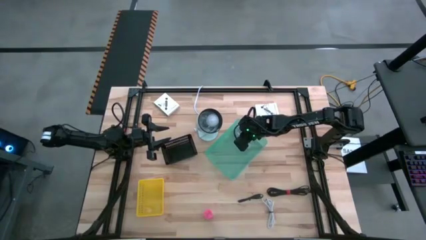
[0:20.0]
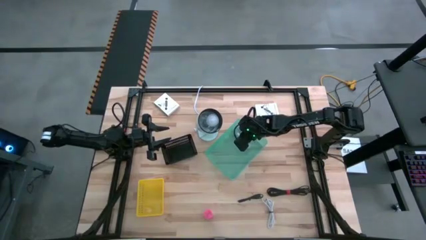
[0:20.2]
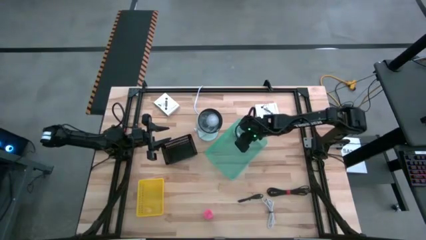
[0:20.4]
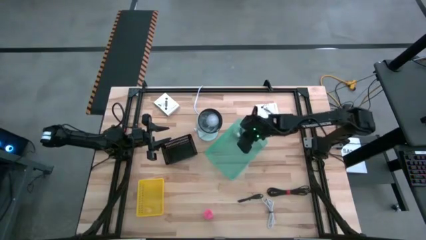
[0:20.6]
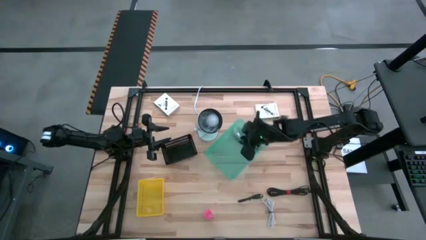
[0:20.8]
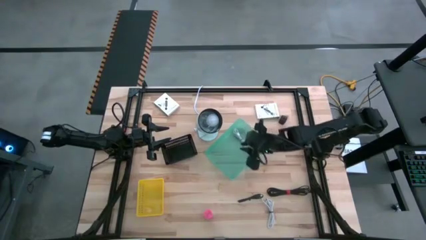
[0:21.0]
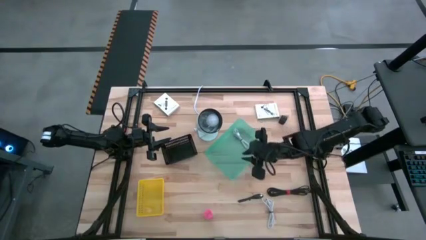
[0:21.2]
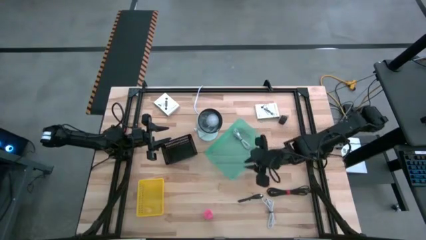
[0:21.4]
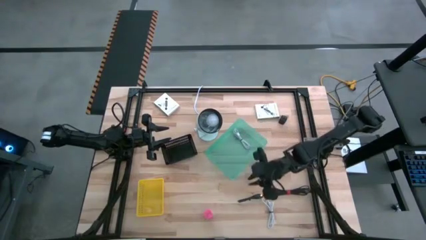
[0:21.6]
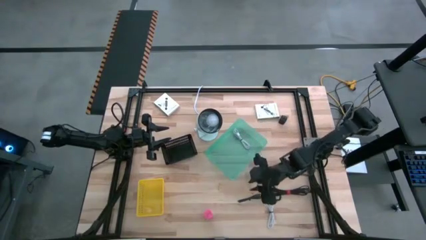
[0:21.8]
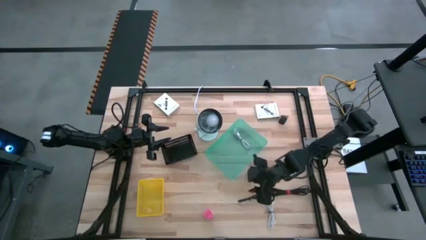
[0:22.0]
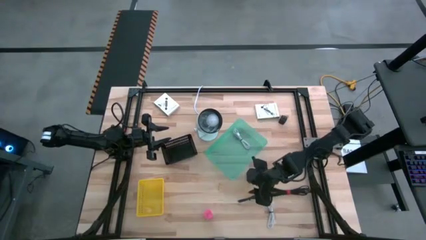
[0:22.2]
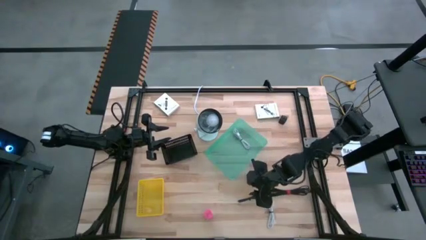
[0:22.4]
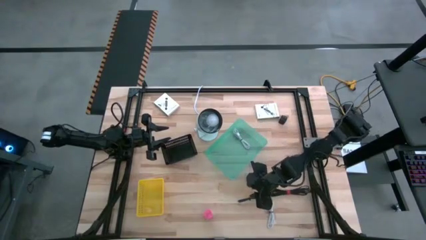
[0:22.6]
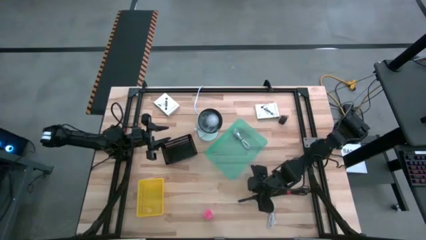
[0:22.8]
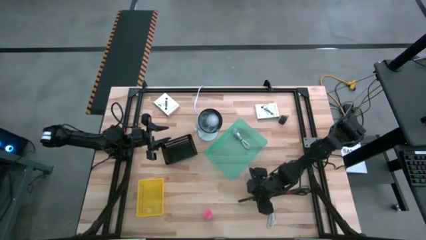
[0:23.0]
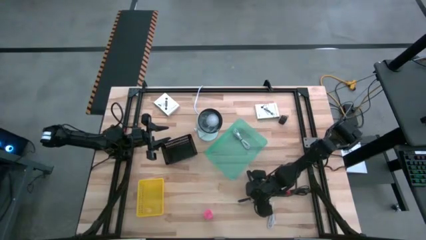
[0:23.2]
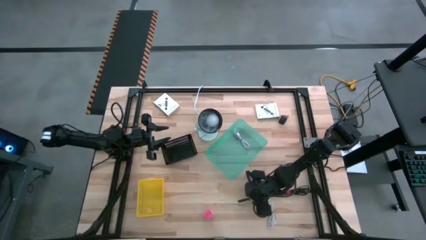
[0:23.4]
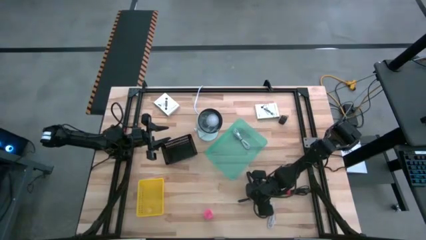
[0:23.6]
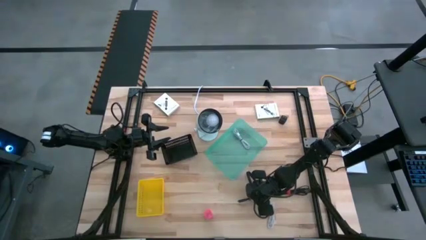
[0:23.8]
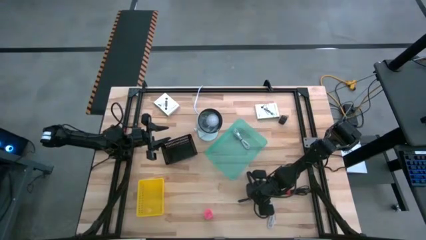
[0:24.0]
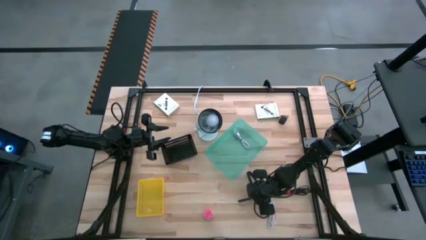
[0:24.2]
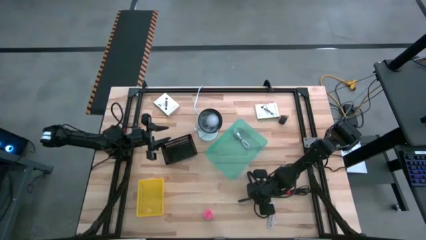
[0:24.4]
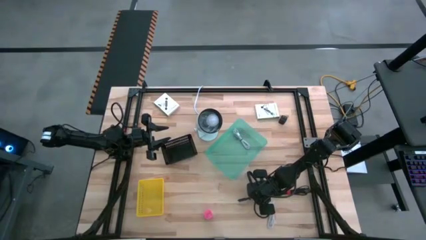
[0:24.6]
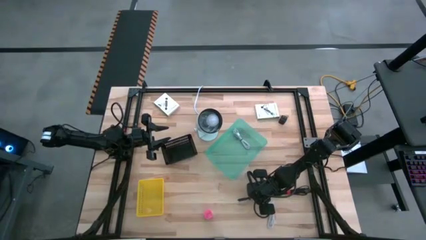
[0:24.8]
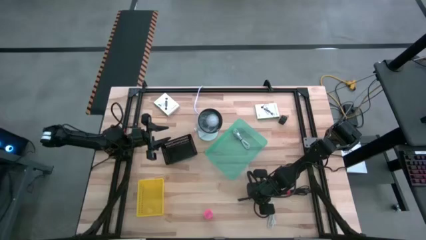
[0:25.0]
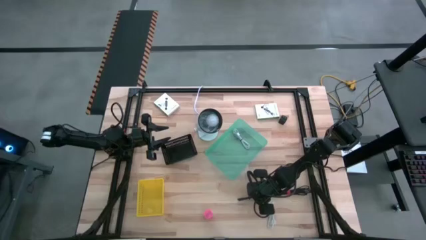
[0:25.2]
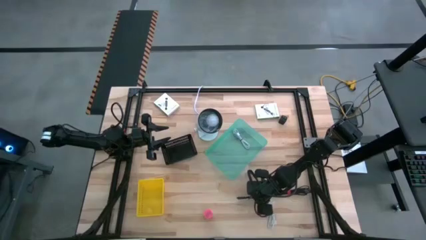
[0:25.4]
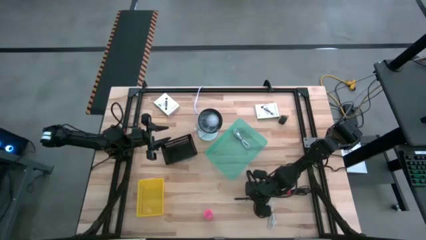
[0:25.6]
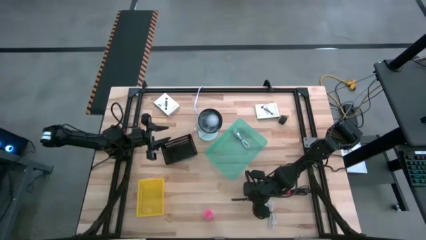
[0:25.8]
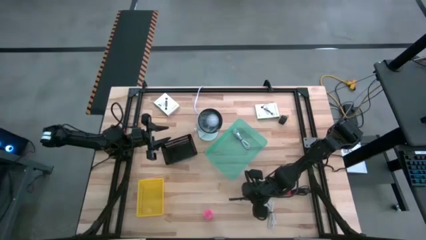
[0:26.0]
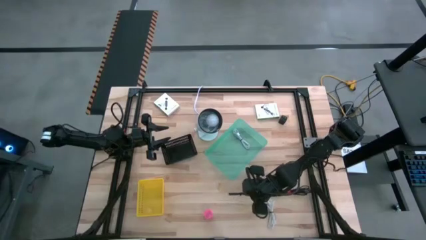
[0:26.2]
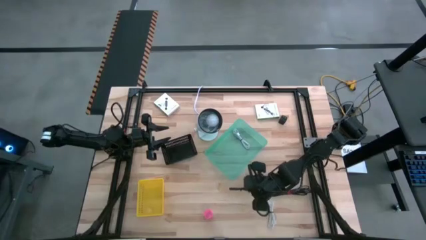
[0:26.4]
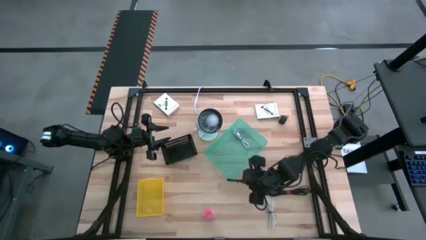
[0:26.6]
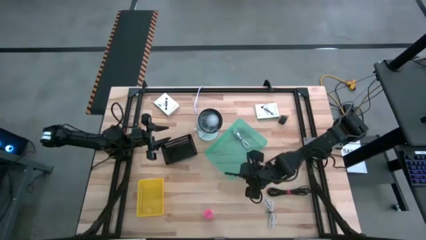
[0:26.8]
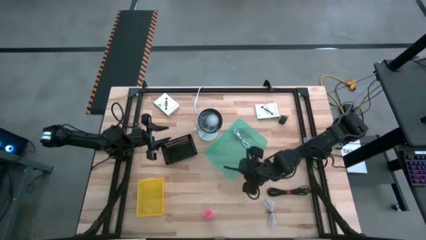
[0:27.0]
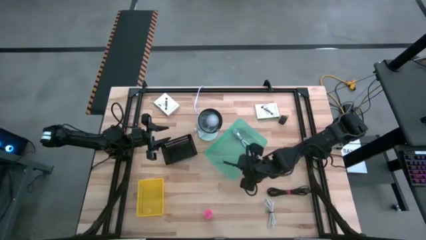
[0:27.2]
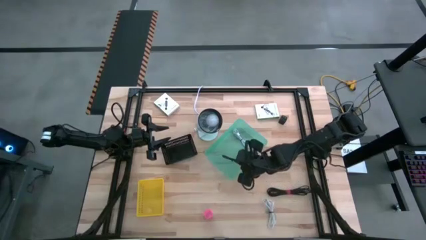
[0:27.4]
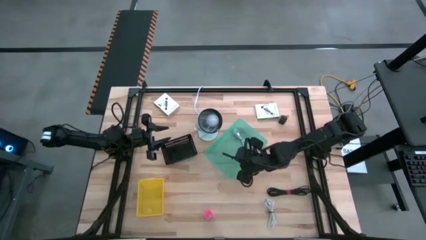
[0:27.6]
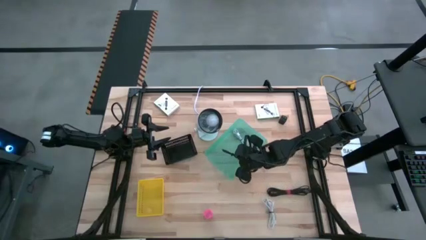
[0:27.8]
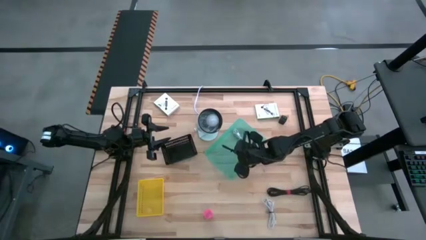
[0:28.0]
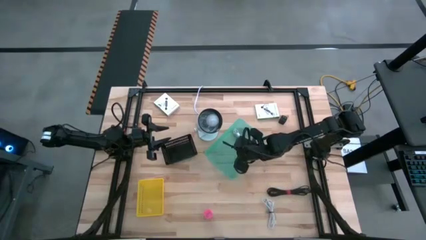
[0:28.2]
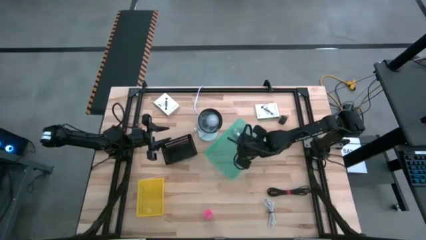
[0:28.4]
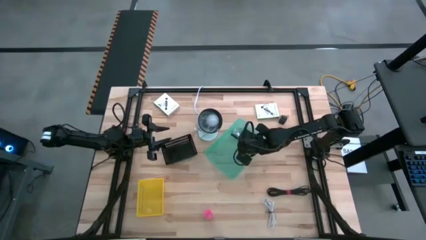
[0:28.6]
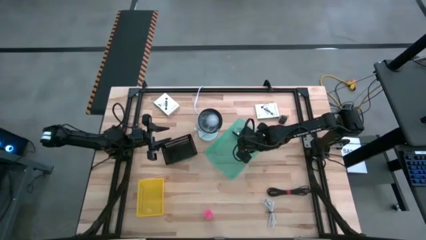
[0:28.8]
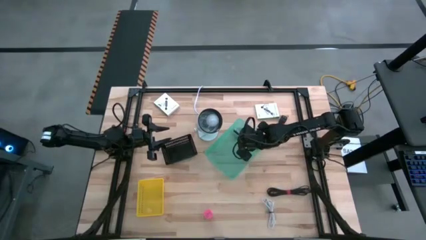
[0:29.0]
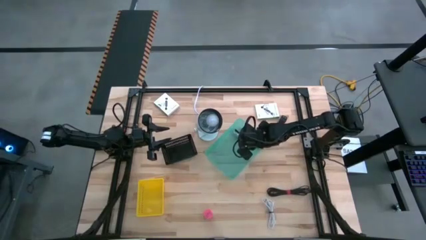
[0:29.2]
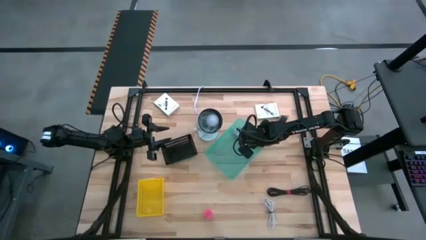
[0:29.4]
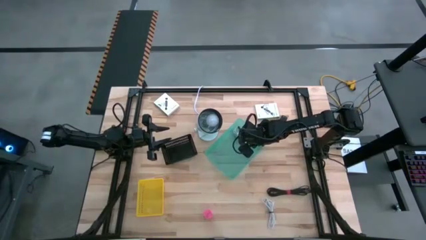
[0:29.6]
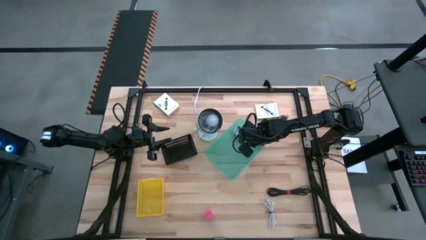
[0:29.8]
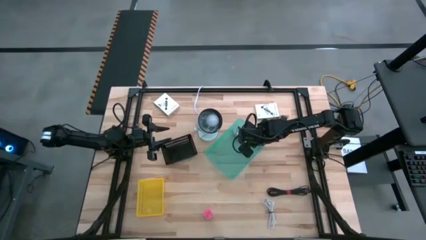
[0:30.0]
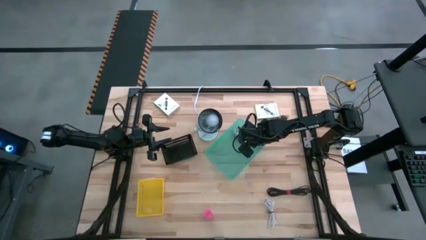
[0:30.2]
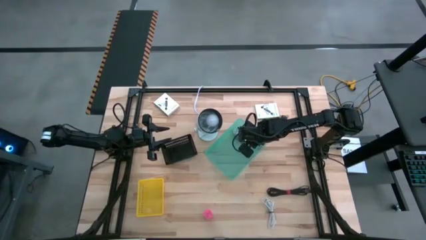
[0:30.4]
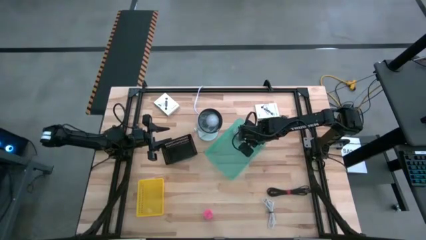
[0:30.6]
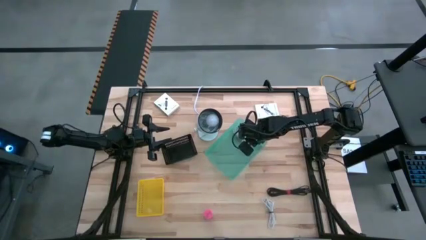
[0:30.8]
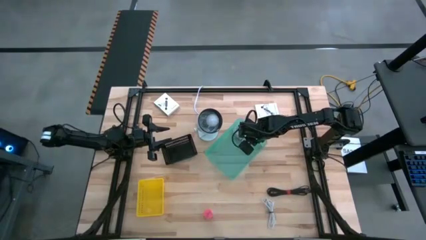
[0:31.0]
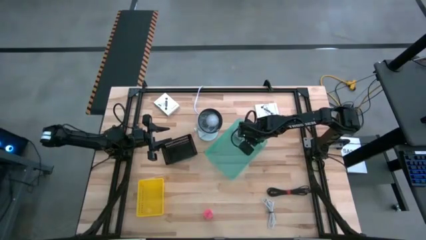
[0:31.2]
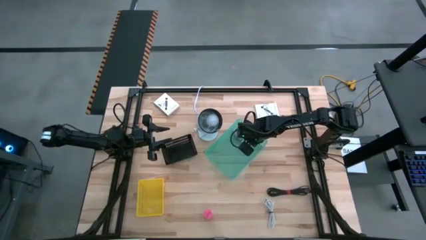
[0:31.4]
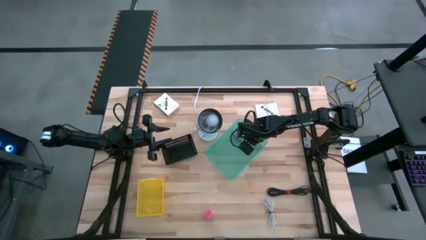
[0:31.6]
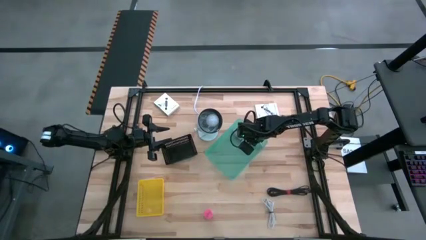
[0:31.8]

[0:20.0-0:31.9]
Task: Pick and place items into bin
Put the left black charger cable into the green bin
